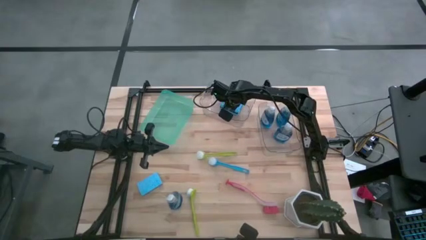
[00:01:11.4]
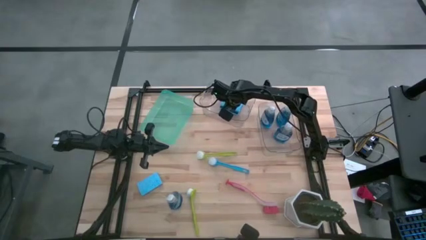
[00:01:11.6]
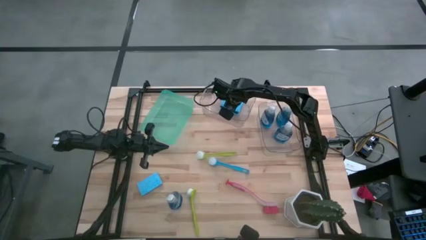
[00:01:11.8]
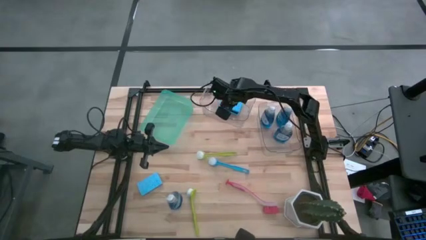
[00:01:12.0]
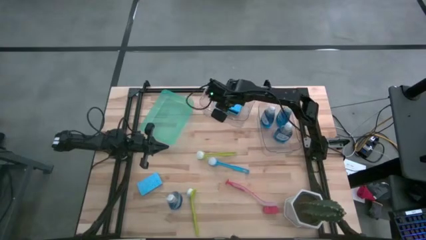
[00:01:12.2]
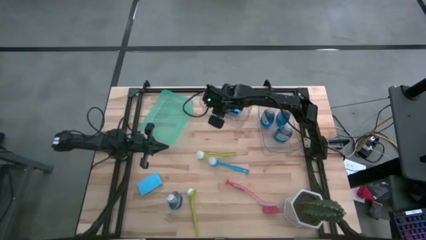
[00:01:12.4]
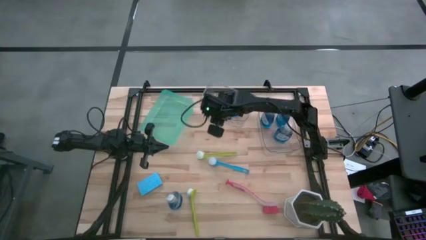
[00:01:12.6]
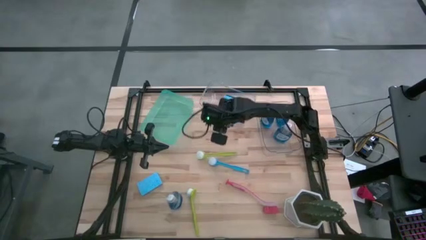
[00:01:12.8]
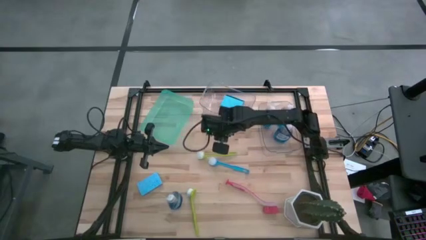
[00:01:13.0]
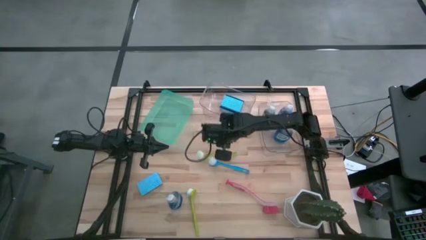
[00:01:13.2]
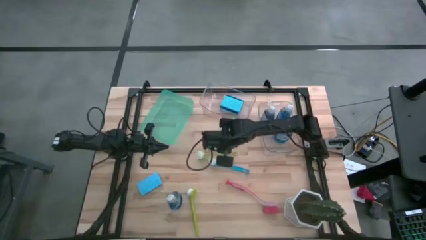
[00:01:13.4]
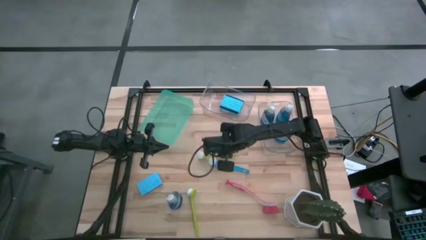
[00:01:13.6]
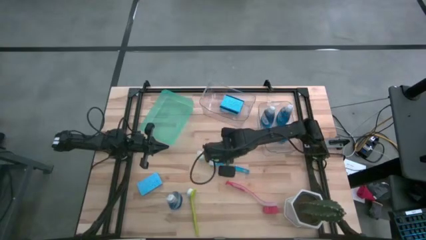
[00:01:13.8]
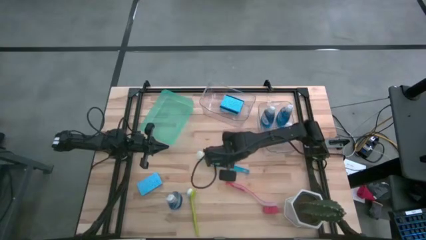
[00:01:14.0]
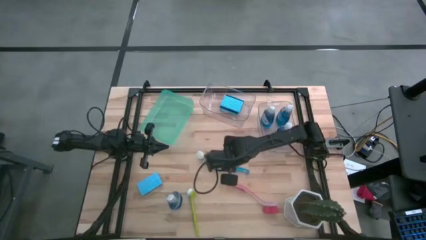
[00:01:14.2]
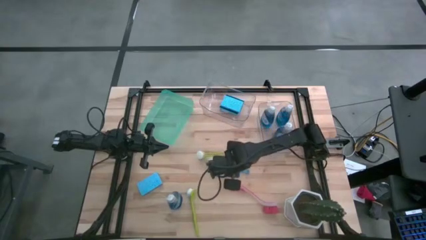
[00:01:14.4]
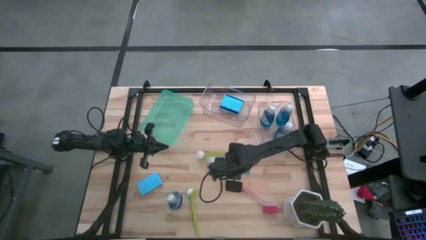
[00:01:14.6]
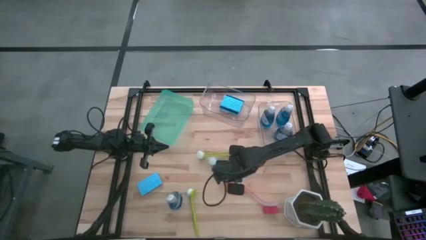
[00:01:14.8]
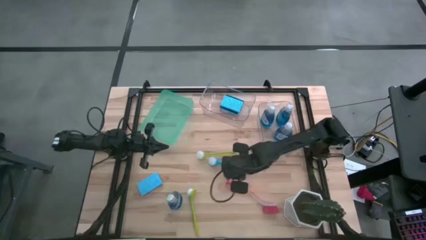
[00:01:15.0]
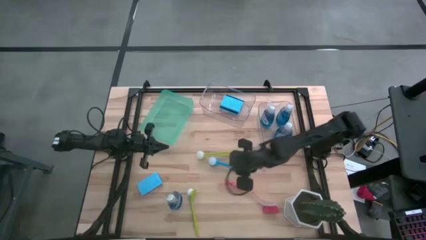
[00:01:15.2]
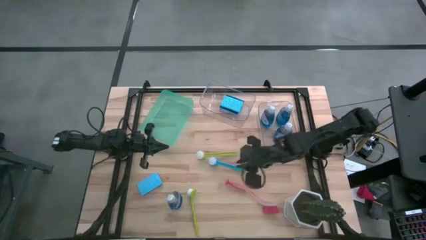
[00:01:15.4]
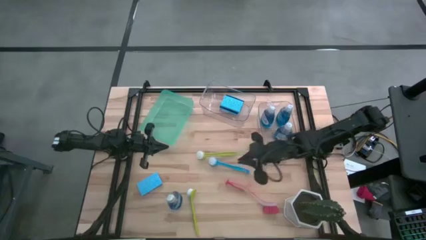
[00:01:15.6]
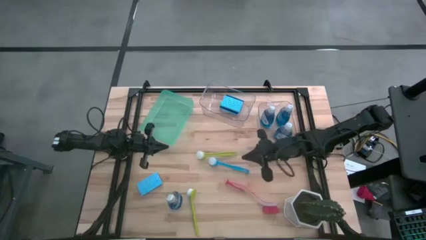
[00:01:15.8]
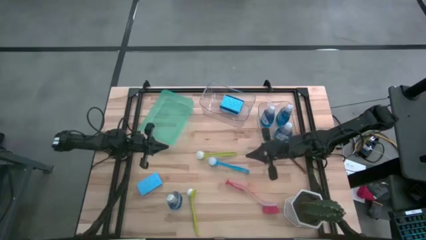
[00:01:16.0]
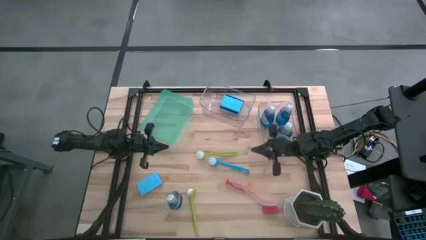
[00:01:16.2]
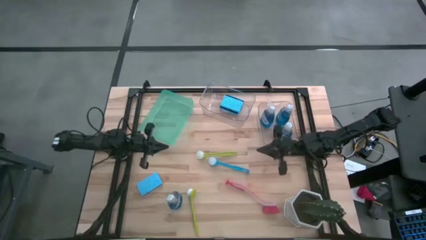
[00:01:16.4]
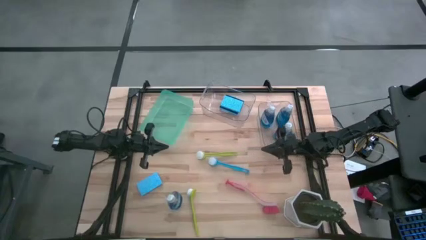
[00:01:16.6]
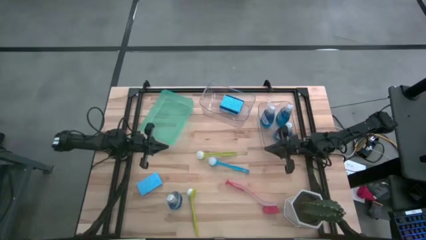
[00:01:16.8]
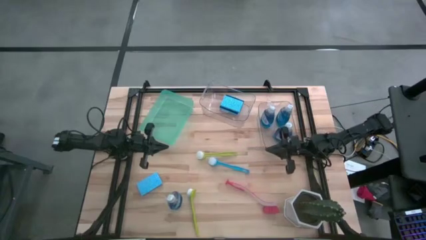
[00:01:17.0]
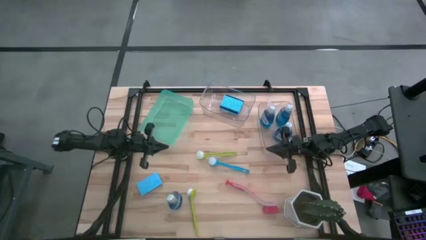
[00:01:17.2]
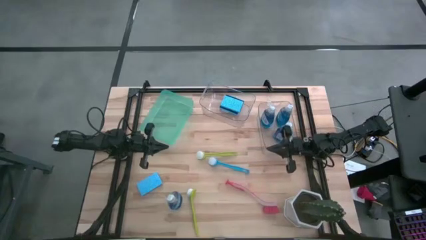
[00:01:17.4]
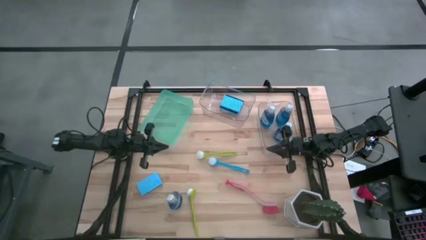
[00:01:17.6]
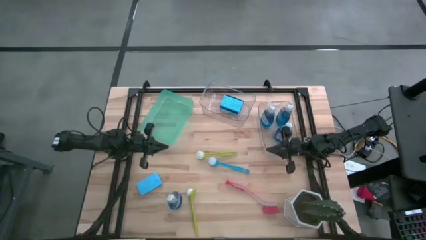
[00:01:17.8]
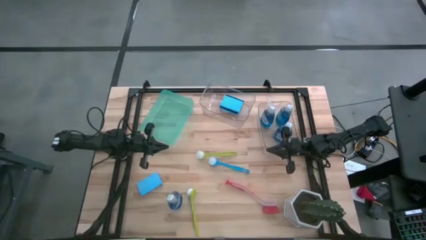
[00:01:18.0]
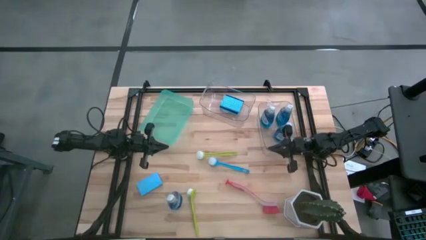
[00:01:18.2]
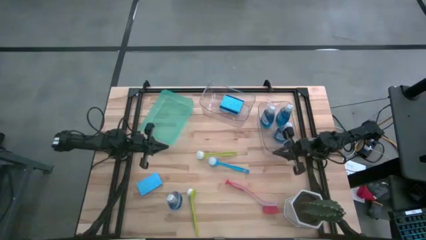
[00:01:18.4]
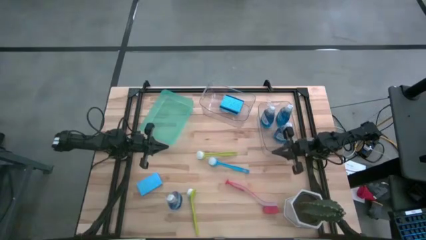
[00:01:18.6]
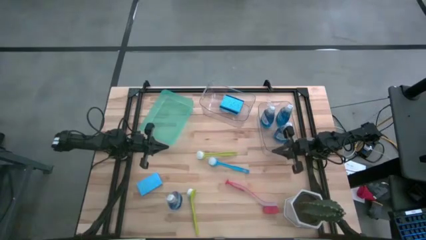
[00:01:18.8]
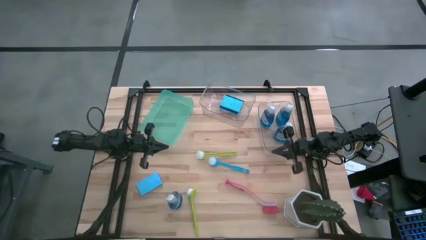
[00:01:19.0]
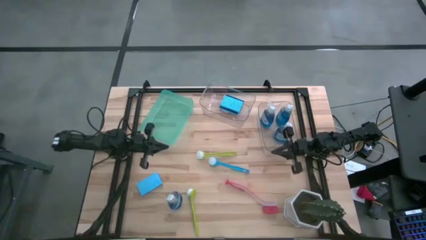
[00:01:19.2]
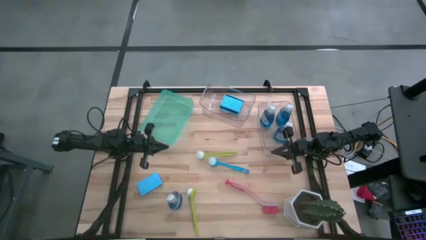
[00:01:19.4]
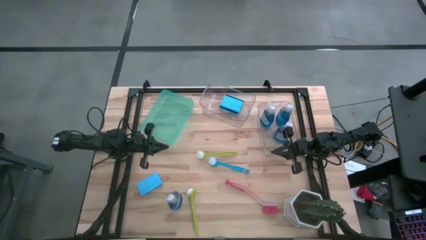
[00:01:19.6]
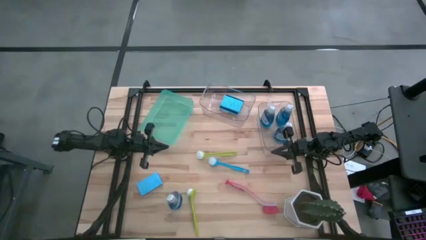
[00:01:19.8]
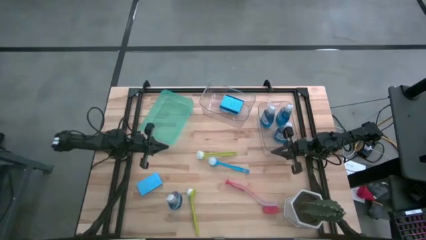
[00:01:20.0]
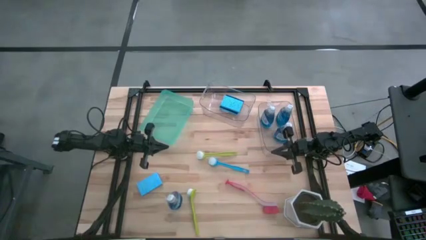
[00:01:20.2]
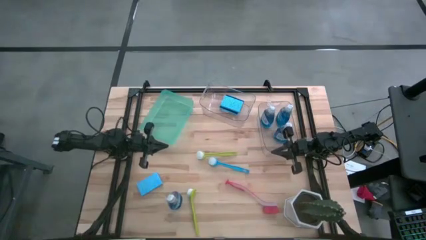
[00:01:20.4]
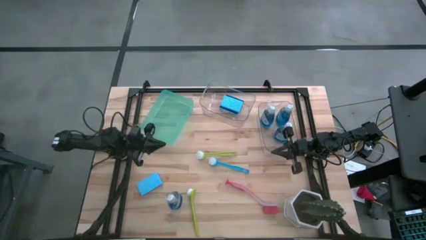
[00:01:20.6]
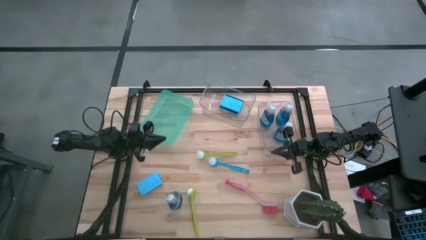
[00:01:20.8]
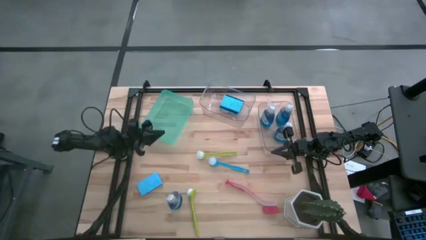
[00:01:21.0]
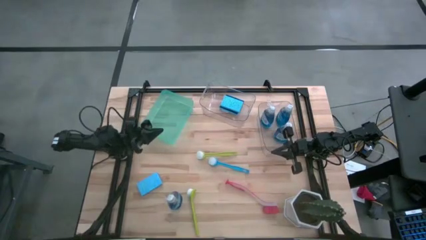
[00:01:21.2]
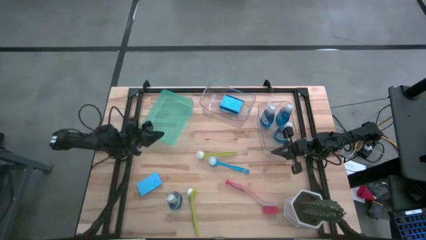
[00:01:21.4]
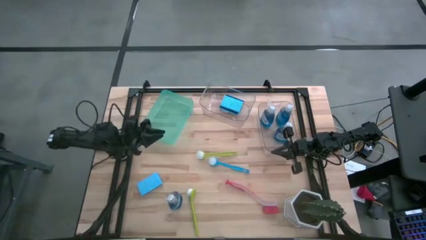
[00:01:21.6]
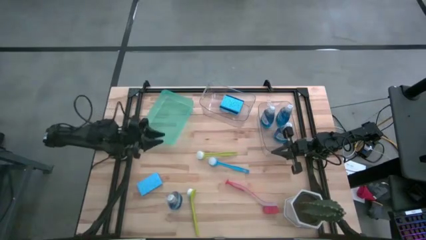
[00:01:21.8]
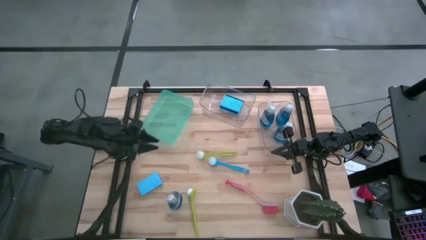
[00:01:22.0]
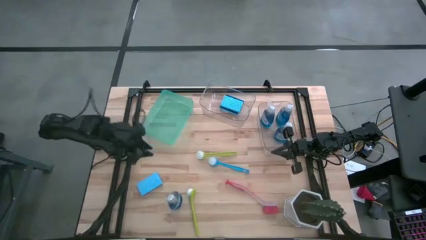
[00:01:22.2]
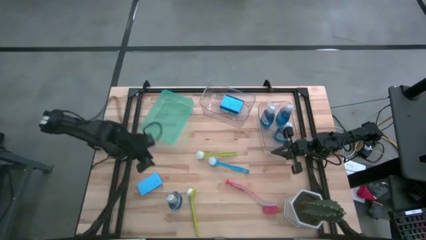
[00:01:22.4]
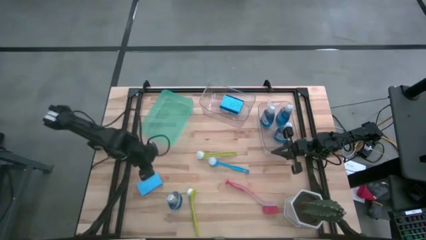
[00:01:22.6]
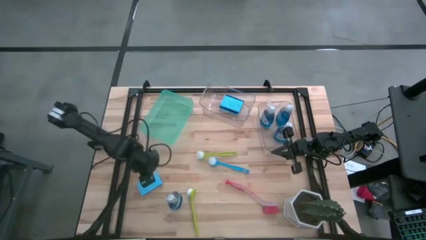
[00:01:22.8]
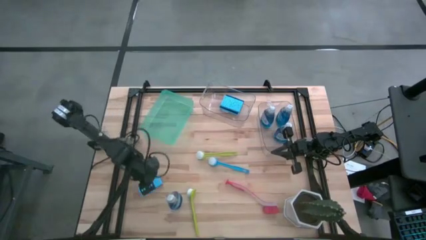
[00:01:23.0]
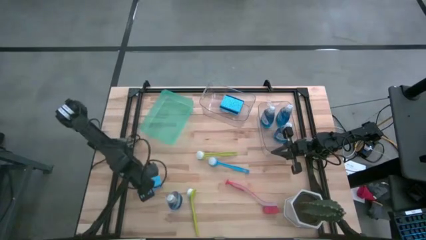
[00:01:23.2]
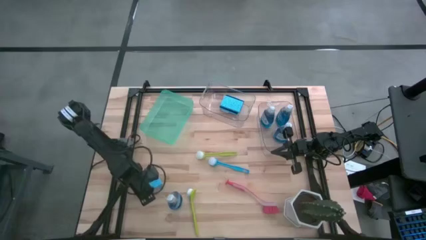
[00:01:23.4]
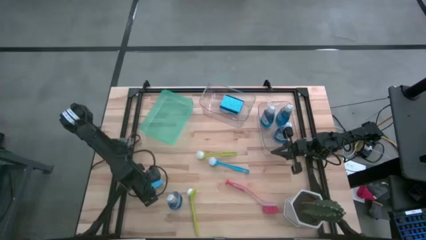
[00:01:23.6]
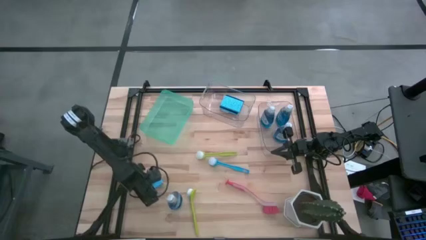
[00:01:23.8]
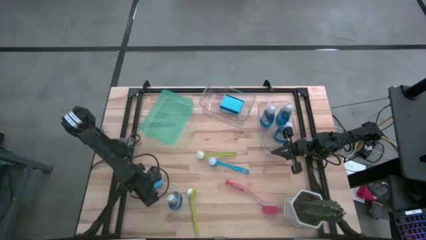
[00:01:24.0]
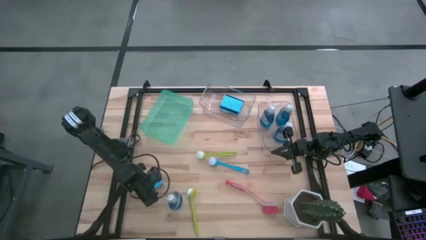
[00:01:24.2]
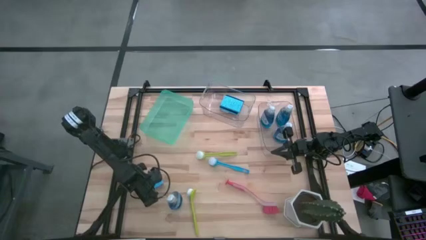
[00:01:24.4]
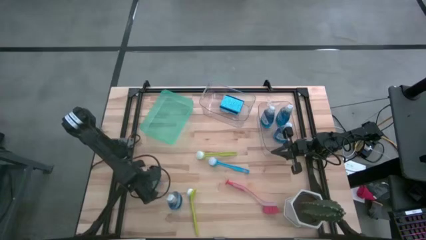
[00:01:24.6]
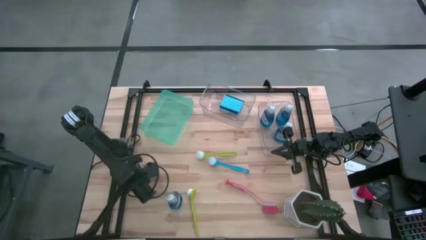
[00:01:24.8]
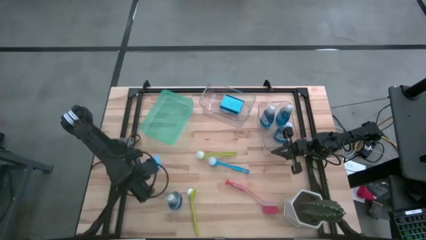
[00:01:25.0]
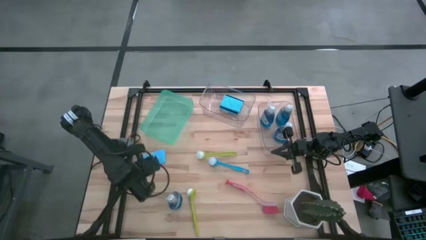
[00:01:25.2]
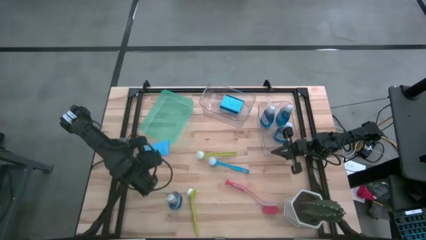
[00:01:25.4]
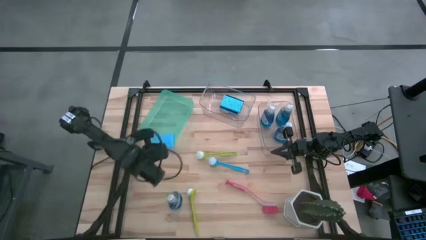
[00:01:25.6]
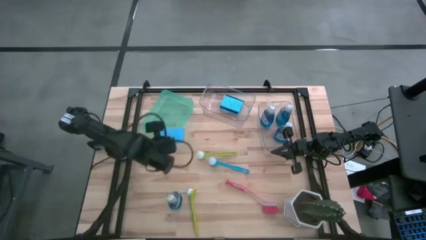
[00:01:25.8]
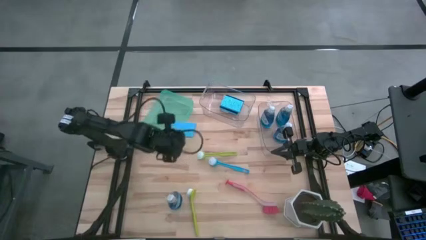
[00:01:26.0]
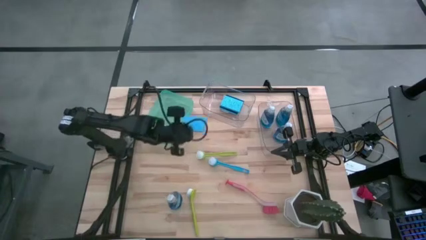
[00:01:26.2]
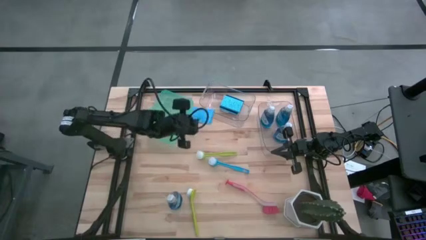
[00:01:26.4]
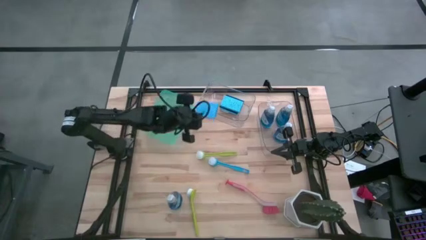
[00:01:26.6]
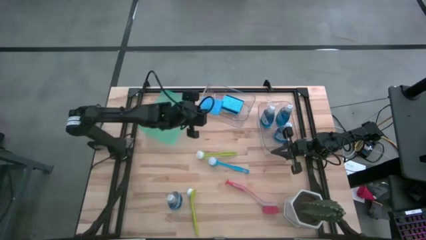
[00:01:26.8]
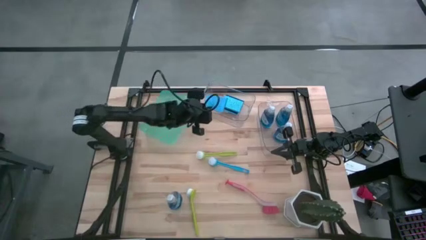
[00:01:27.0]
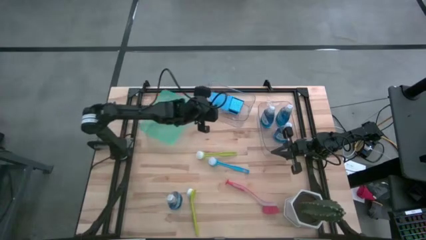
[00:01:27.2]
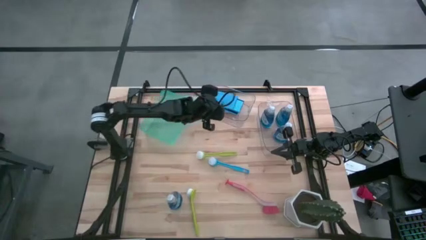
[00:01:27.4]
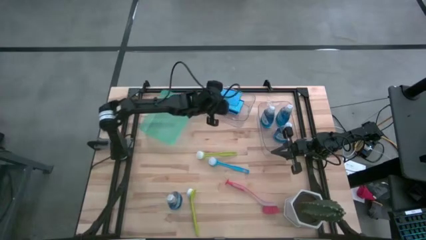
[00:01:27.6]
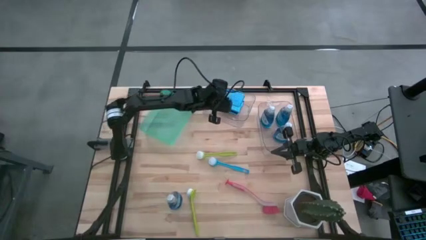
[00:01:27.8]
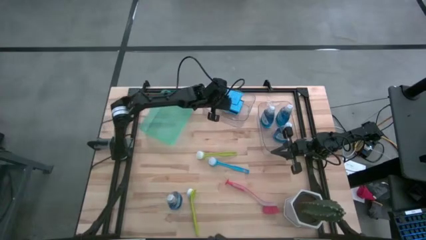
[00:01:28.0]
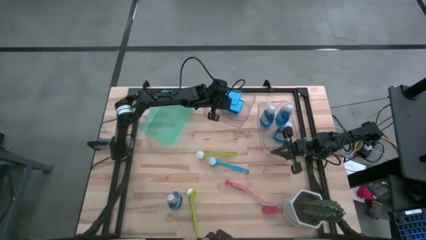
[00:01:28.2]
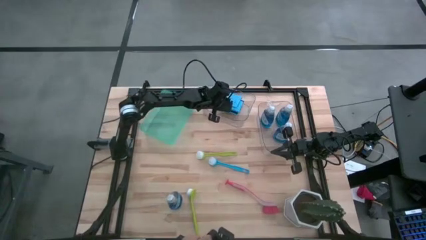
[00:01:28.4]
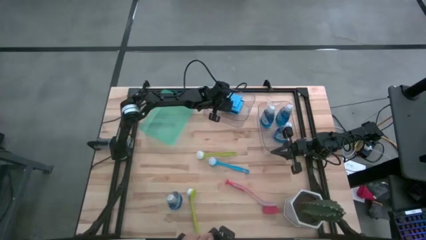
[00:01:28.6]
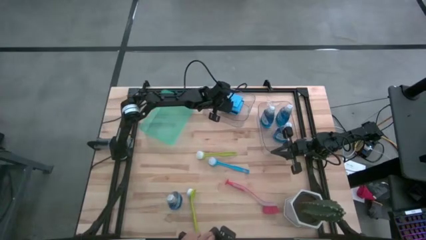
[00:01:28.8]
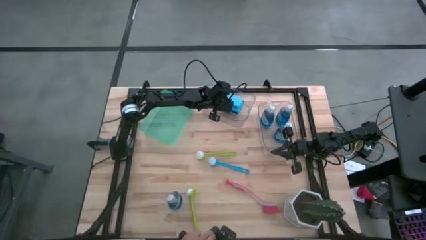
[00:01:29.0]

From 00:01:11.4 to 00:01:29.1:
Task: Pick & Place Kitchen Sink Supplies
Put the blue sponge wipe into the left transparent bin
